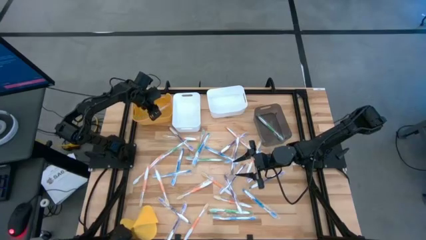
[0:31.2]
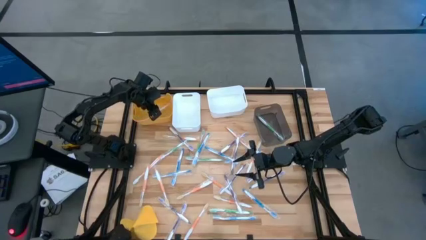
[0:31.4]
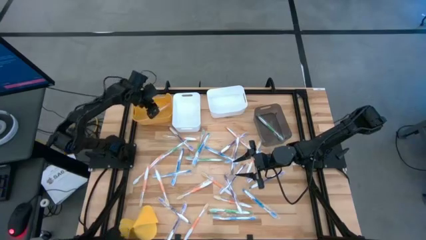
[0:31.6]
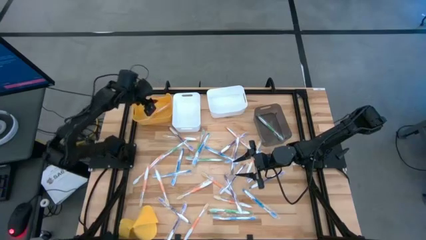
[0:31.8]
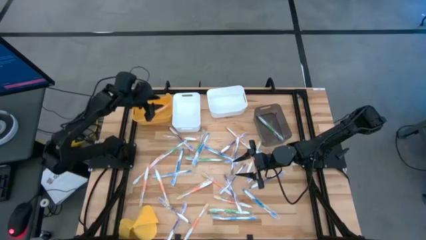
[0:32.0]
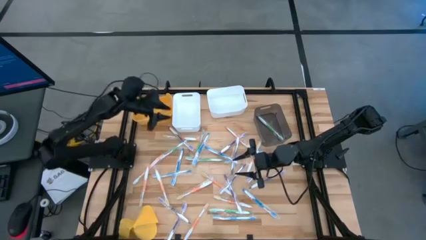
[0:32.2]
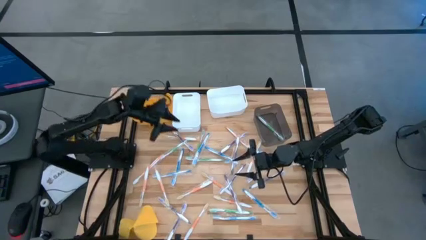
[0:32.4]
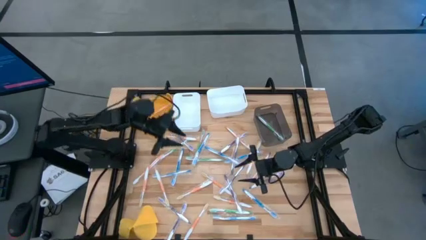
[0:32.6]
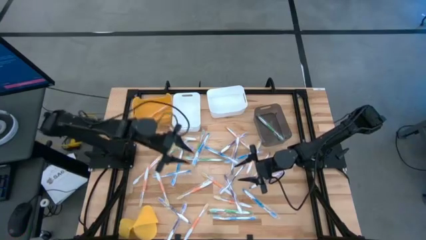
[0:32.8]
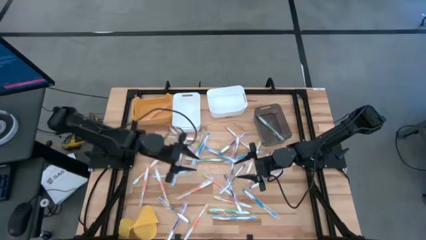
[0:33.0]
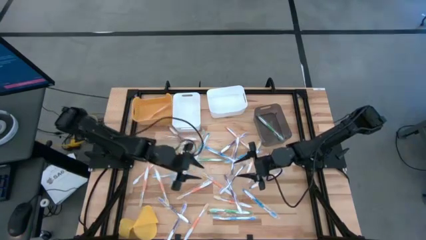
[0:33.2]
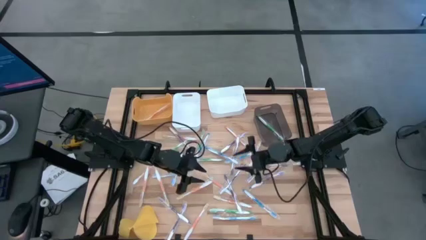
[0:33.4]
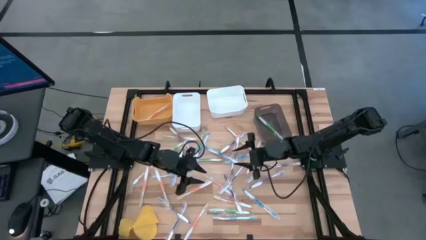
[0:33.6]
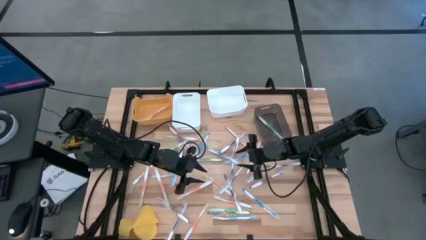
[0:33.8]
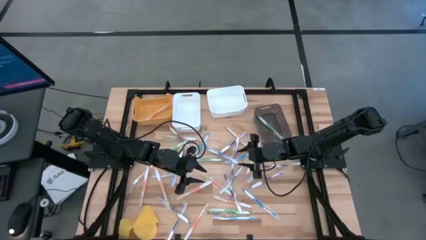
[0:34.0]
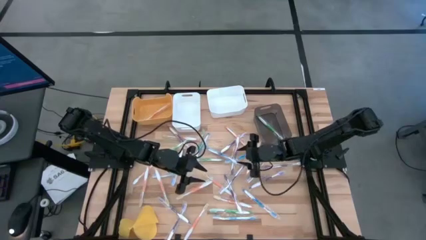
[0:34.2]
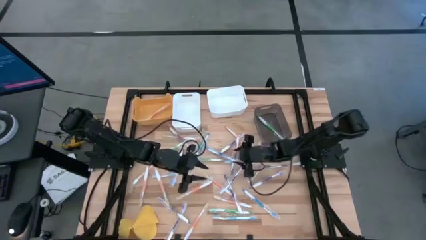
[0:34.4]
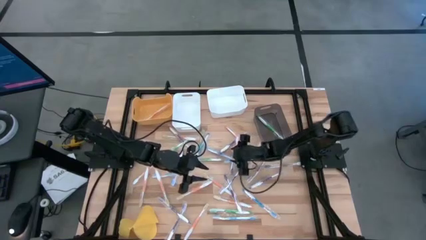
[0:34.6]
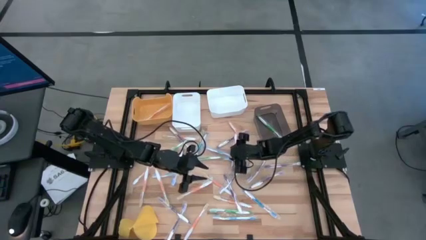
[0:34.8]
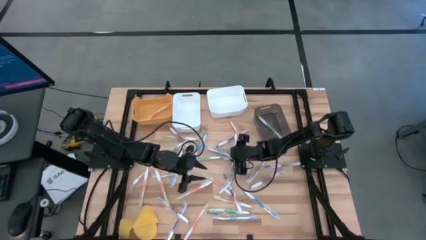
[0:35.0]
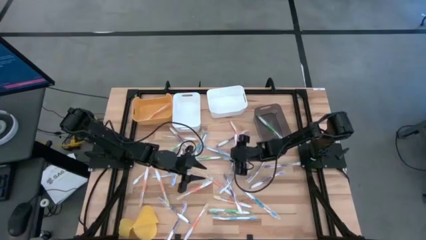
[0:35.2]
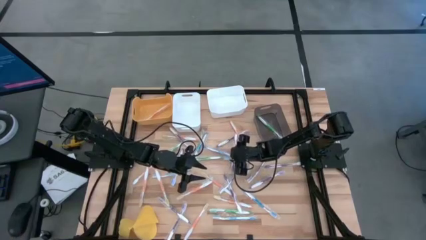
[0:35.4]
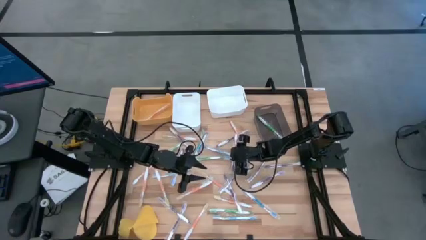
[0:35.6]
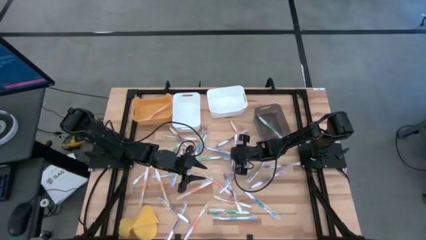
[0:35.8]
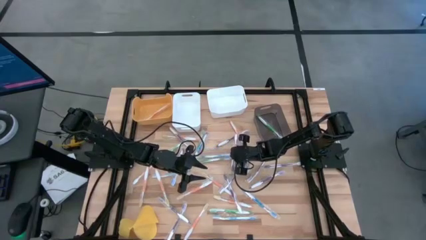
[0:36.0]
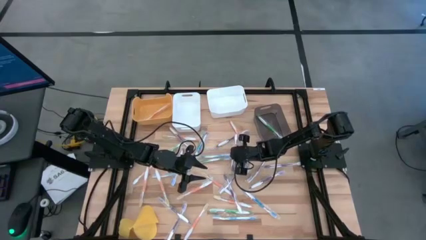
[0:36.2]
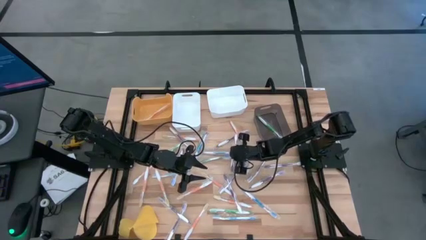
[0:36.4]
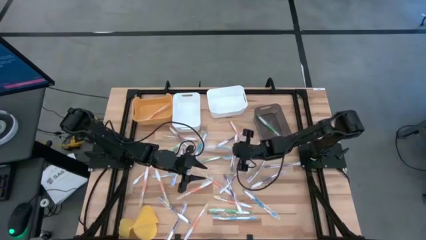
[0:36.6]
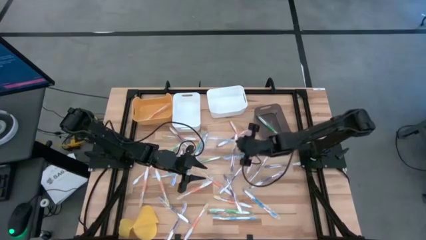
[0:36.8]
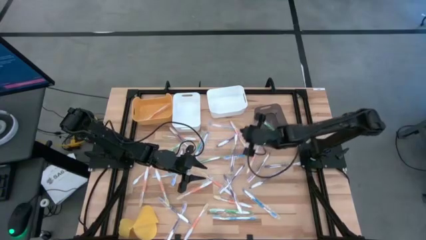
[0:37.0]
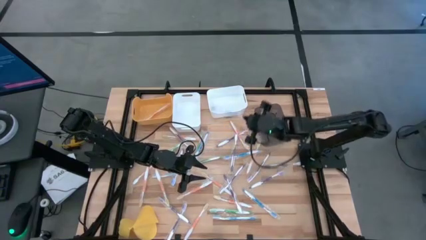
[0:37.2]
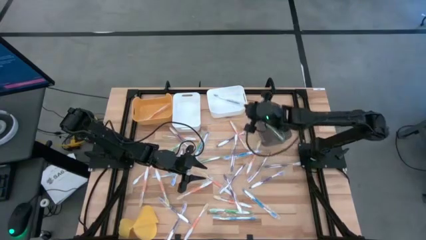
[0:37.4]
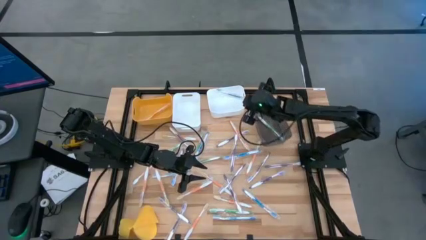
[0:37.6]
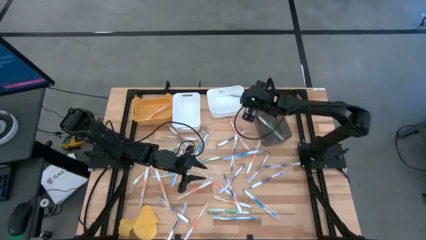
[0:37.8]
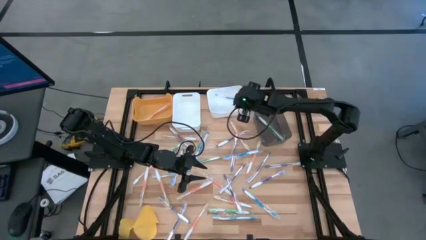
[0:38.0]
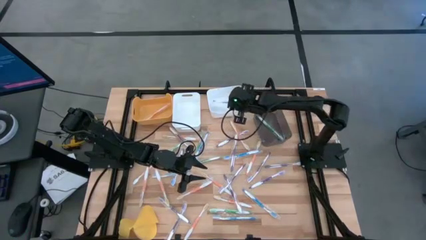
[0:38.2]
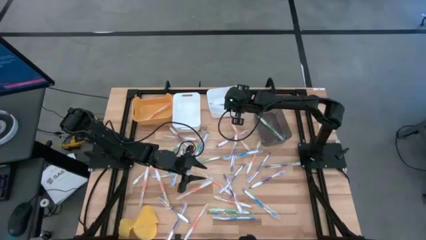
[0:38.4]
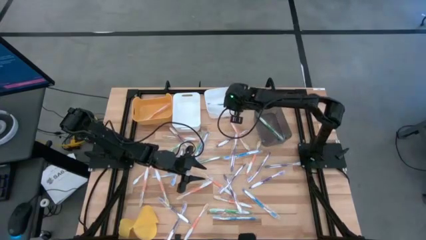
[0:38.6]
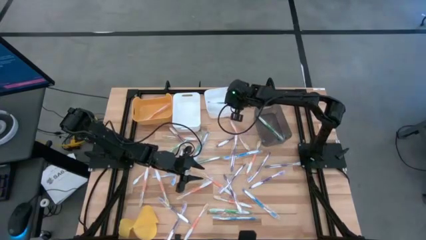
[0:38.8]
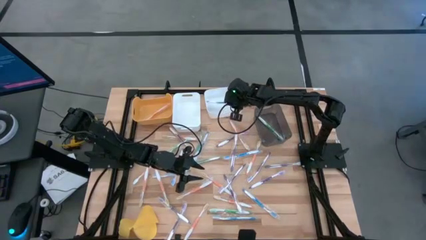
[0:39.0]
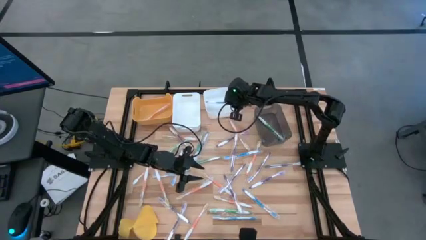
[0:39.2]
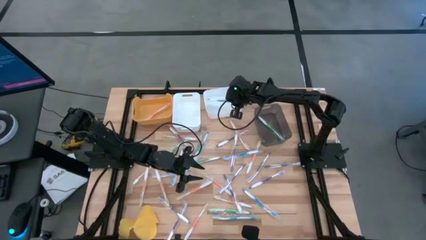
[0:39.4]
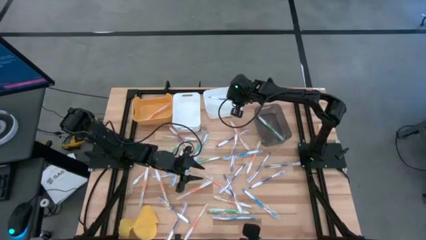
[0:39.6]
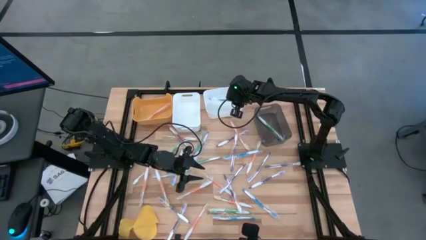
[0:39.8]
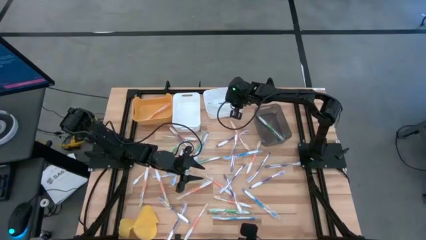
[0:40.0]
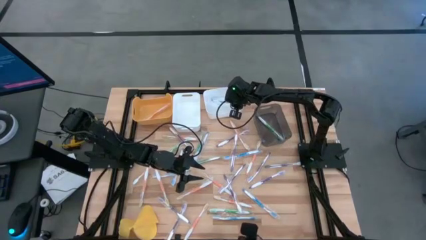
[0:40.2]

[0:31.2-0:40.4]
Task: Pick & Place Toothbrushes
Put the blue toothbrush into the right white bin

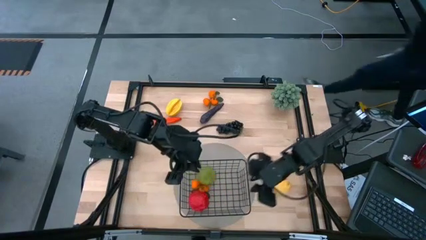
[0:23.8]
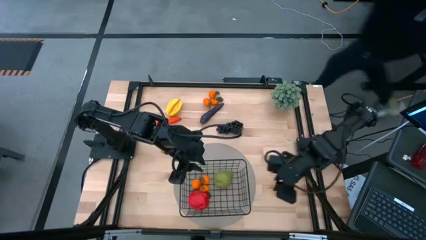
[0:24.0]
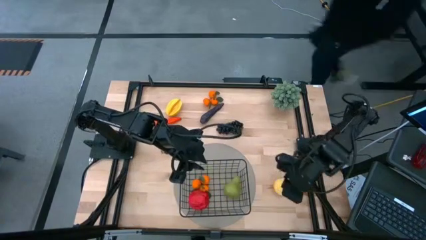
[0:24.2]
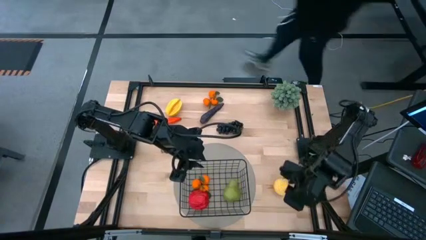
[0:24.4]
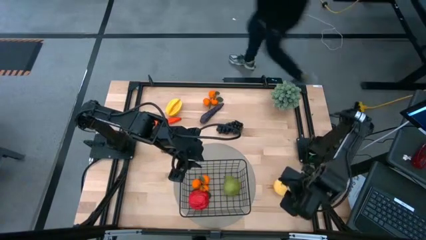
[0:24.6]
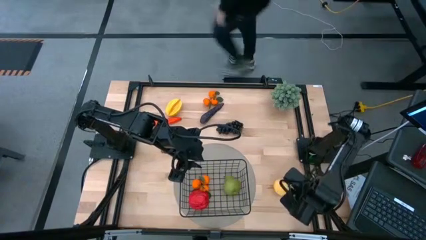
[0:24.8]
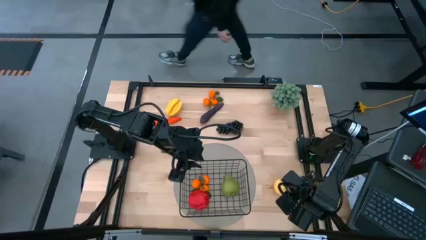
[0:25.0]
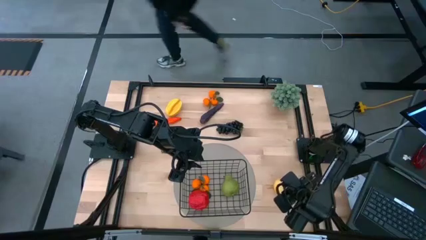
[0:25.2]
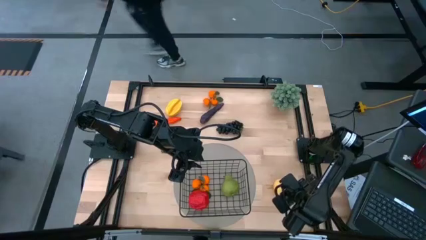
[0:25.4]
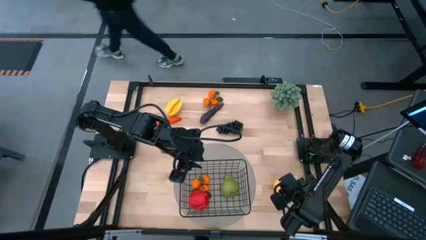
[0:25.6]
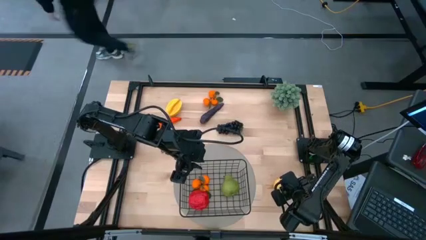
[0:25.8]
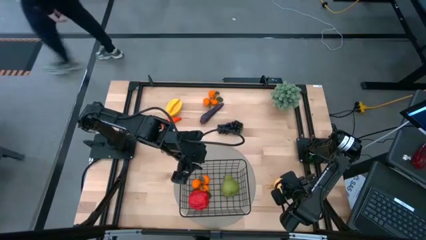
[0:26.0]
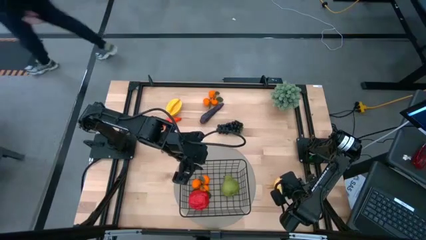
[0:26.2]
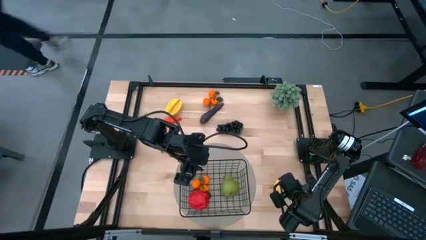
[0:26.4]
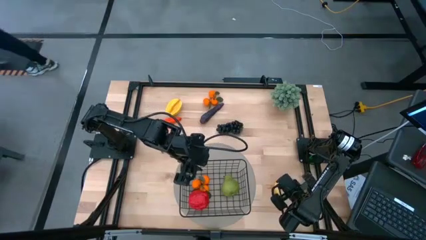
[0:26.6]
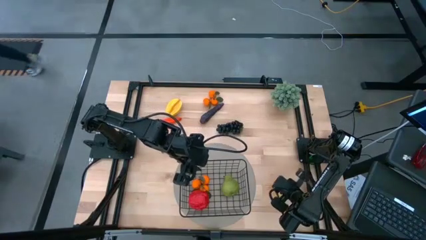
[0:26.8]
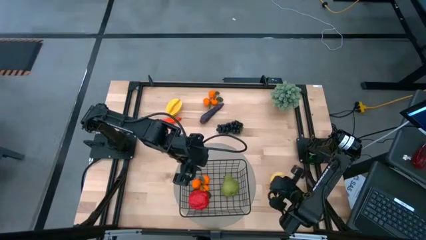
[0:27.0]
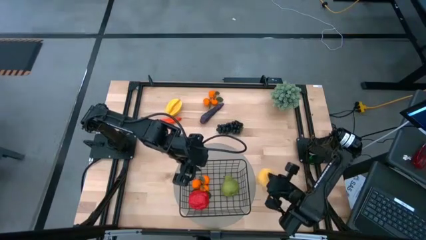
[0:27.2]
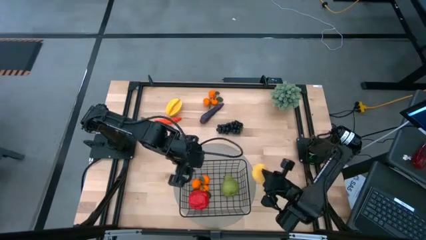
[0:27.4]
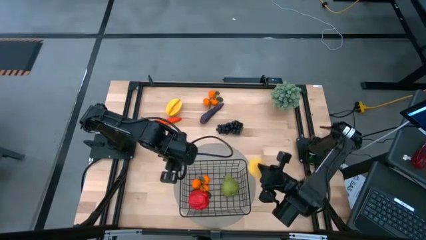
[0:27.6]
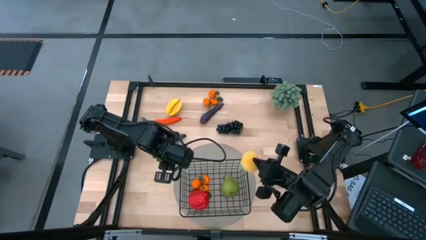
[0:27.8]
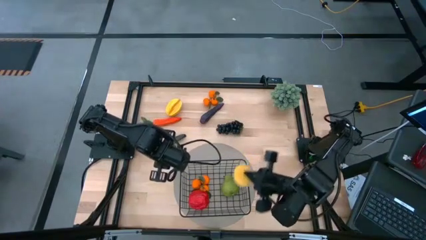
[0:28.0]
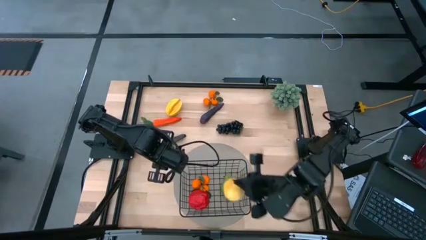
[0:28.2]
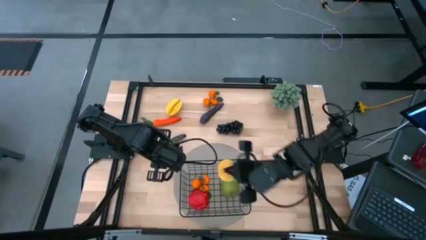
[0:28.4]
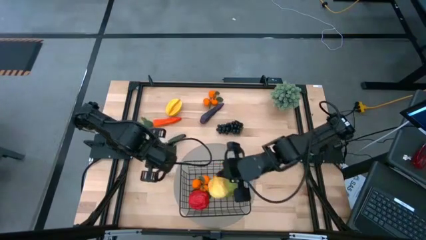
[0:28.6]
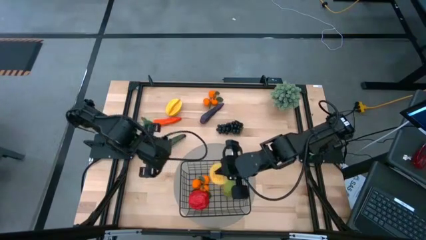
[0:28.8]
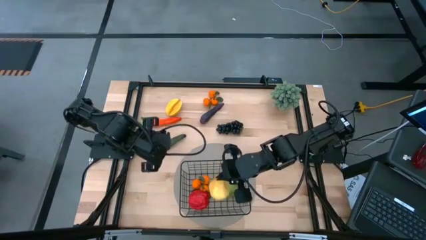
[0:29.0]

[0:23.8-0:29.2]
Task: Build produce basket
Put the yellow pear into the black wire basket
